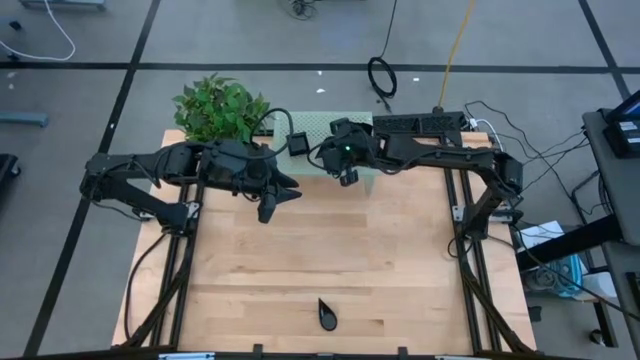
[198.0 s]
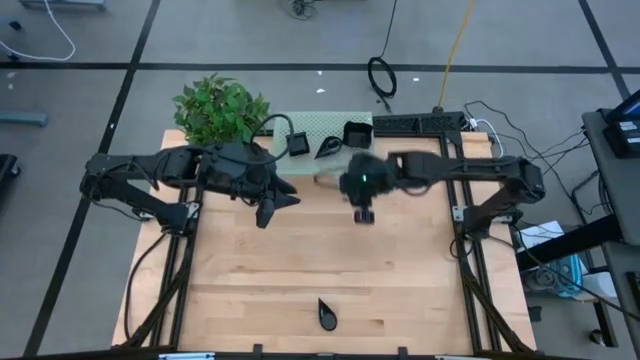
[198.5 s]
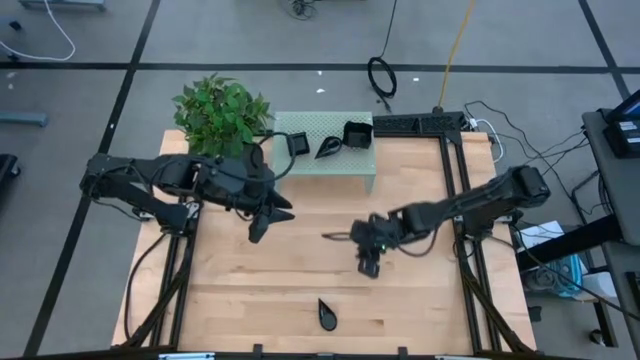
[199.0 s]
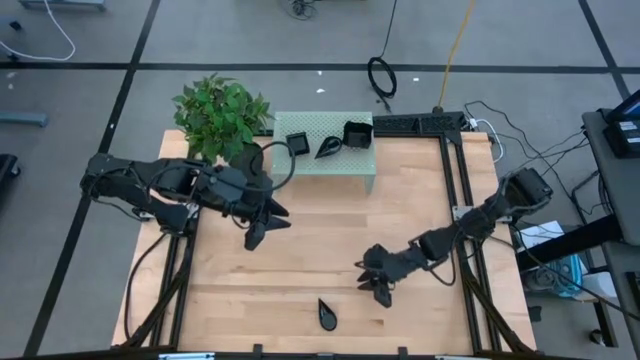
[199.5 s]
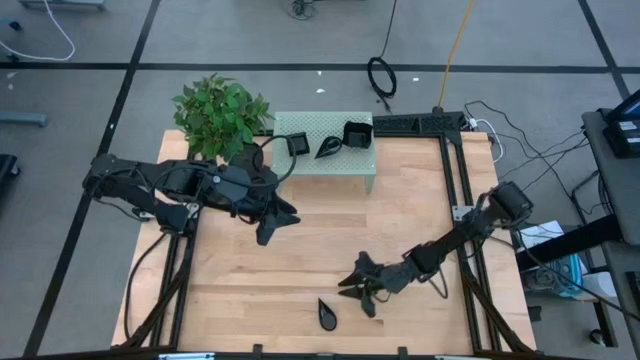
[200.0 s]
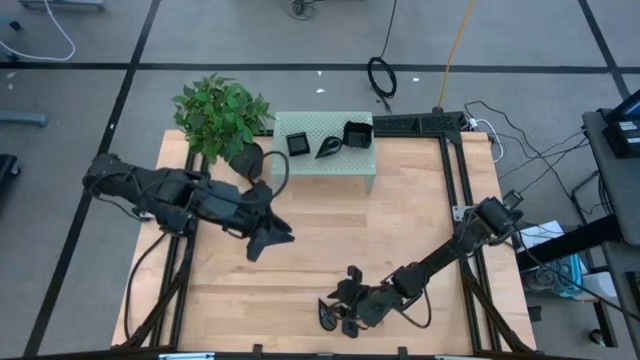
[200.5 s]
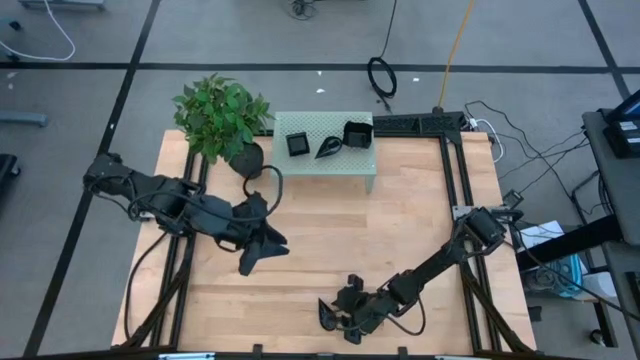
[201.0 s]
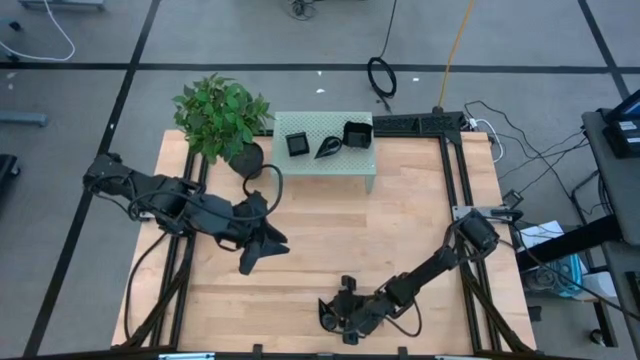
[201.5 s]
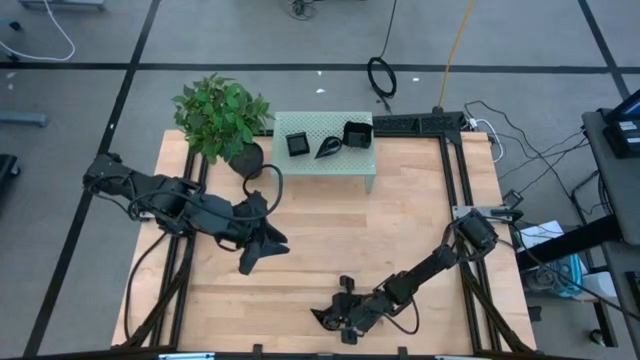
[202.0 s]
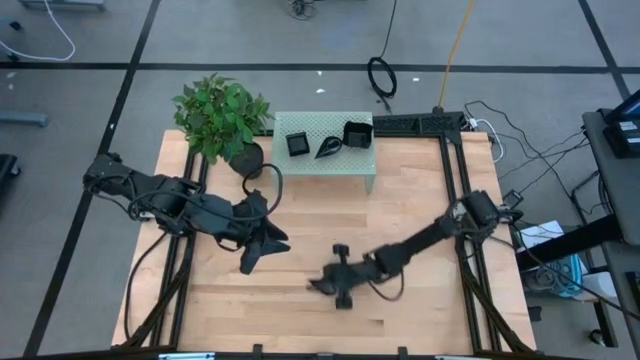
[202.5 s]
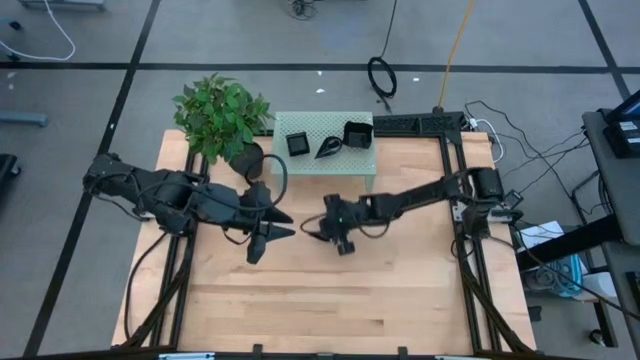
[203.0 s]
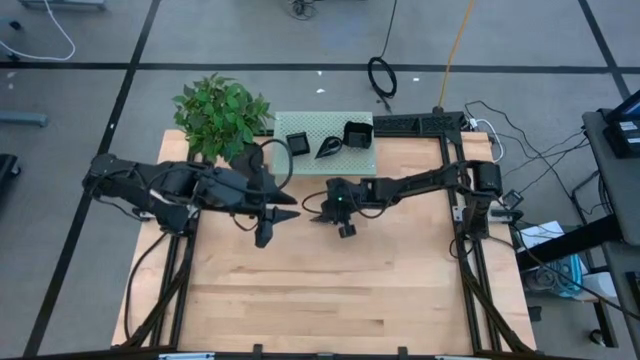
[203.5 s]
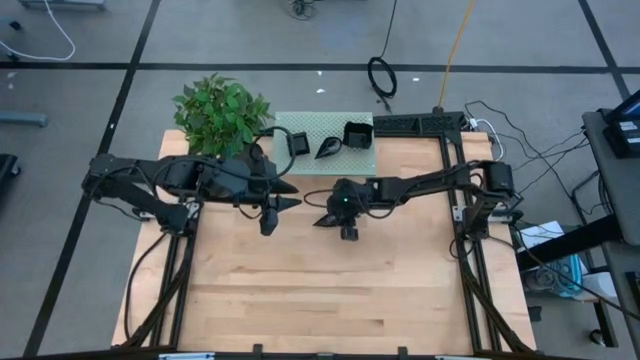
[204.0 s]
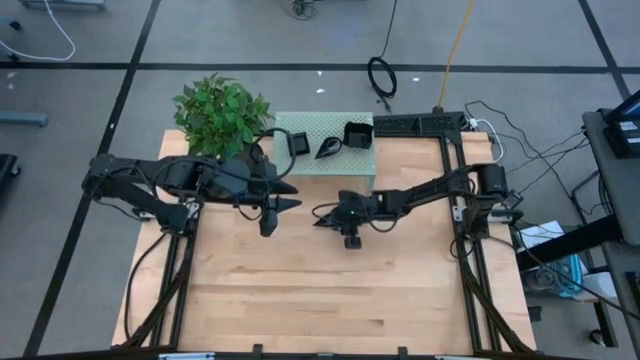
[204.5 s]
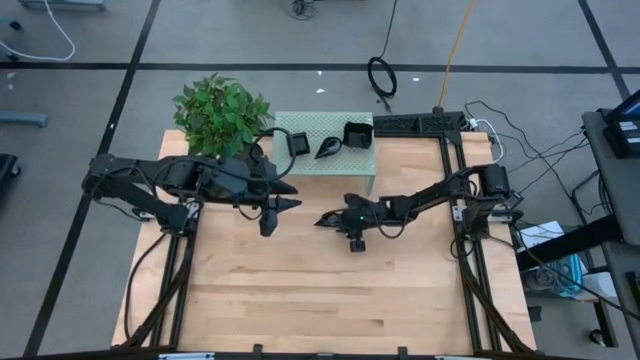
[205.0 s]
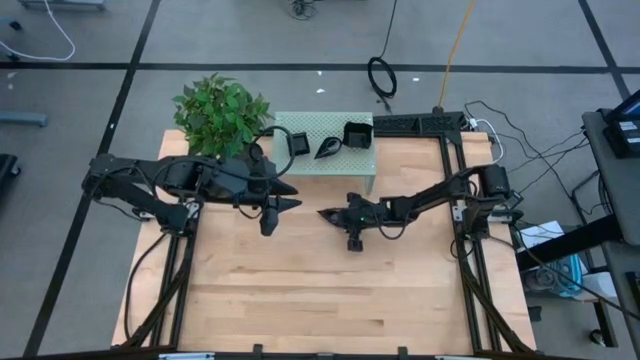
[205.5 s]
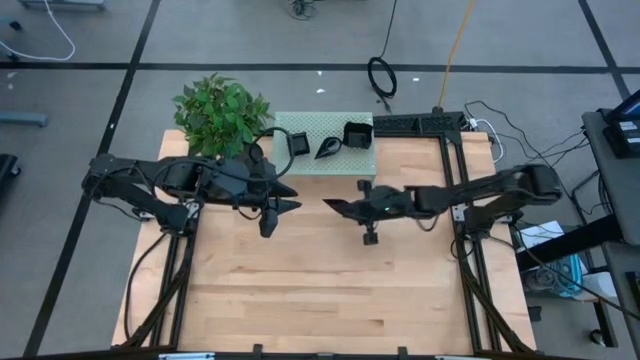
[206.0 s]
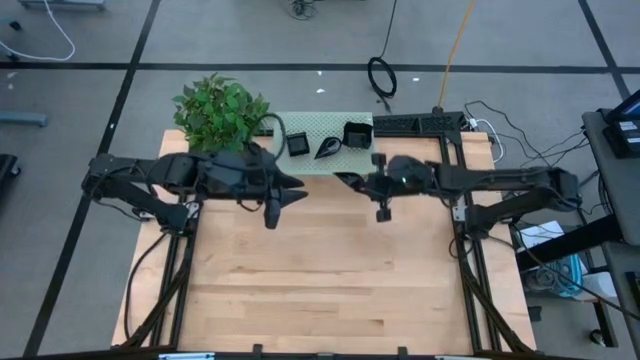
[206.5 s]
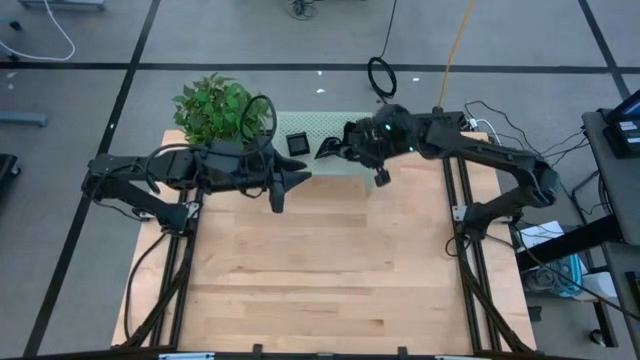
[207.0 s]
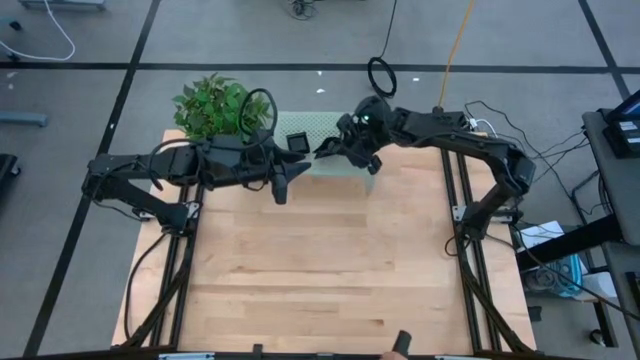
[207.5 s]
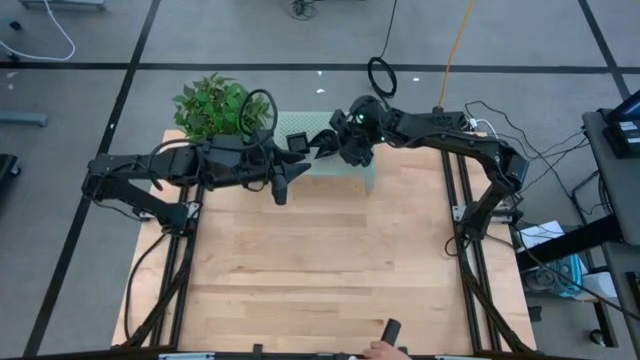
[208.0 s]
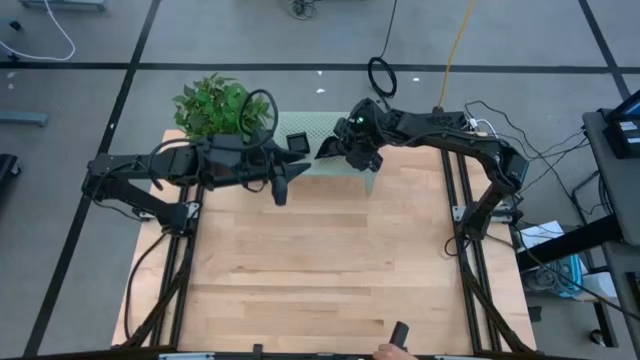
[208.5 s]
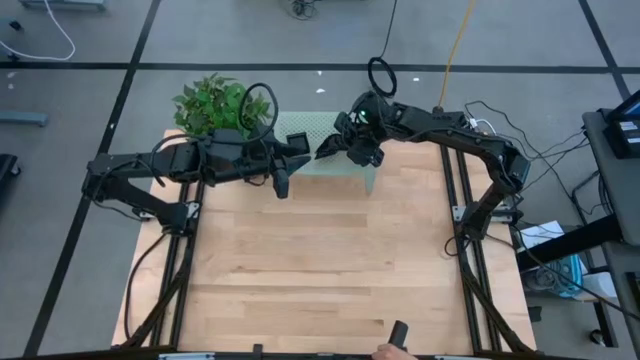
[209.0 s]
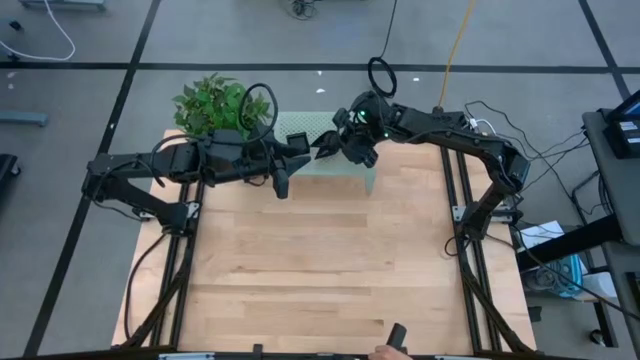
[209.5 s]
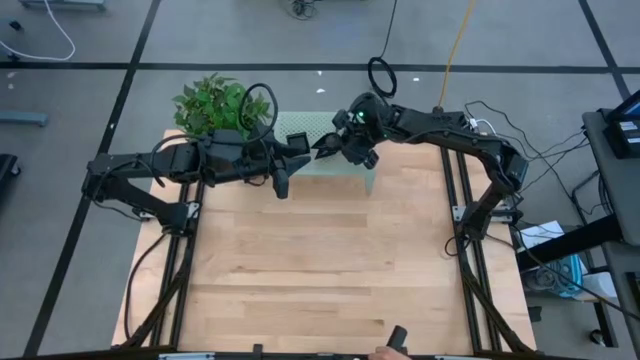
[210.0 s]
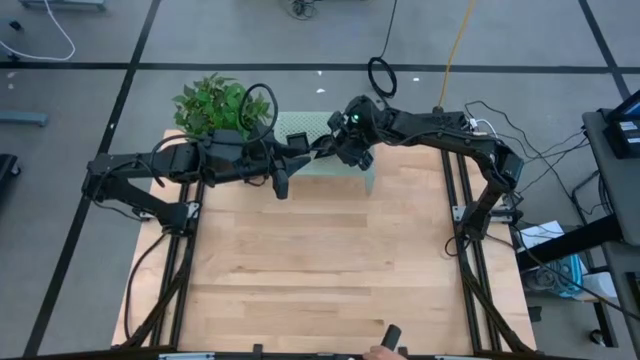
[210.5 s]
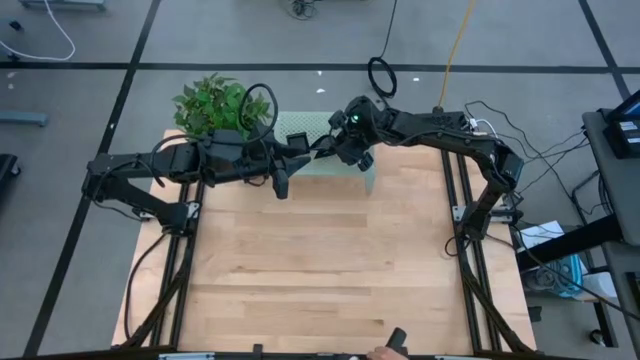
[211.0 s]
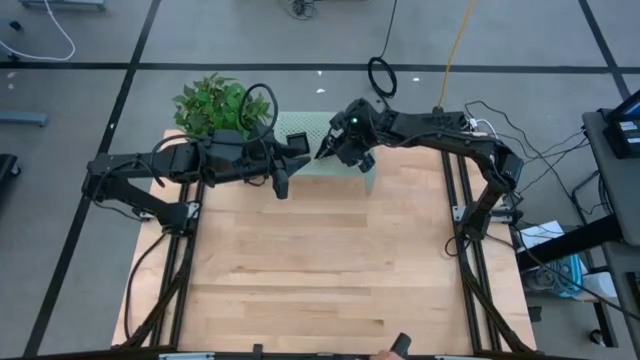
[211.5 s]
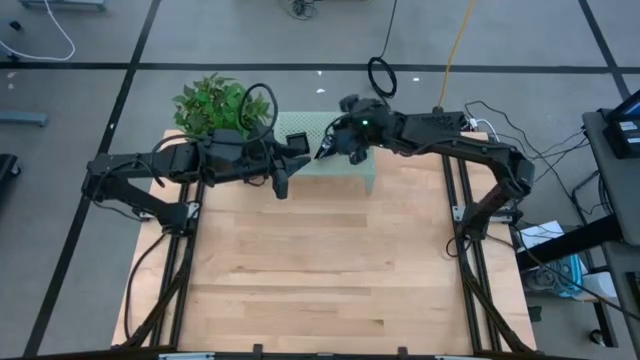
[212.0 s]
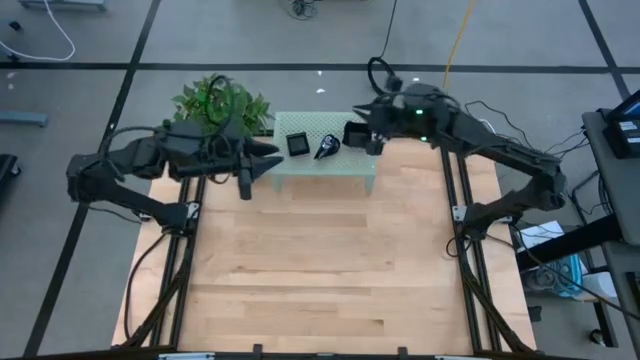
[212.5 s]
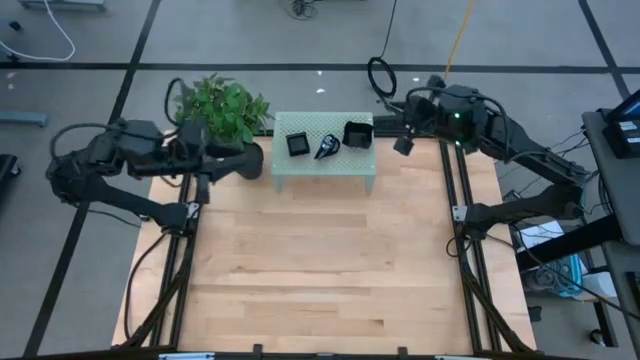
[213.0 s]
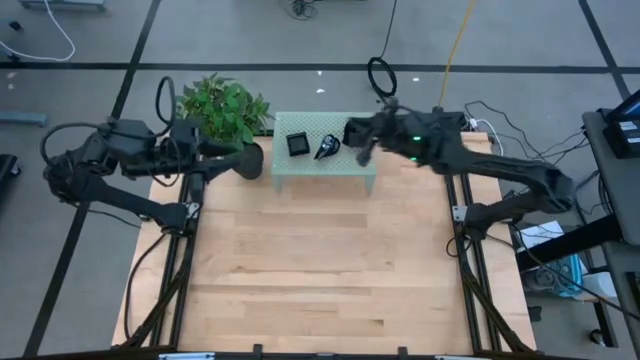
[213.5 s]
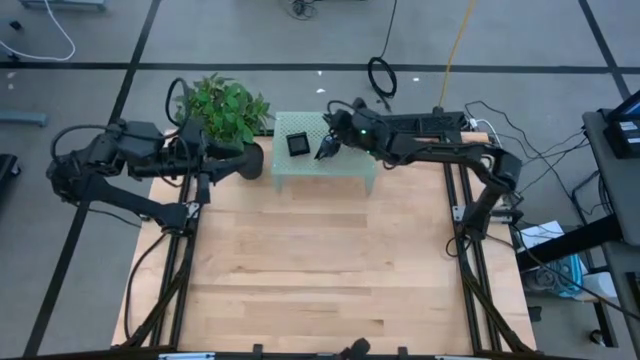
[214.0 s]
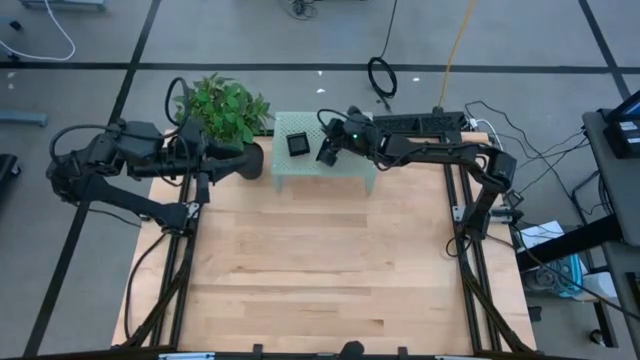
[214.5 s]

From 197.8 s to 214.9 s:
Task: Pick & Place Mini shaped plates
Stack the drop shaped plate on top of the other drop shaped plate on the shelf

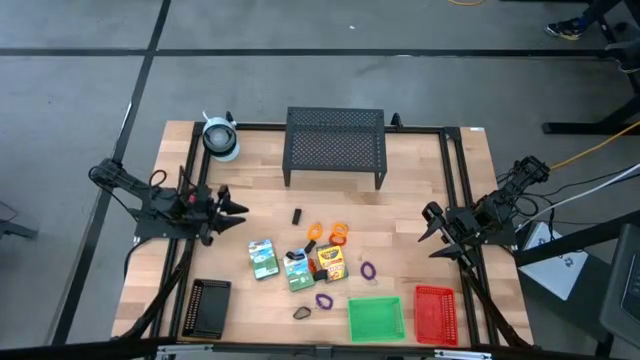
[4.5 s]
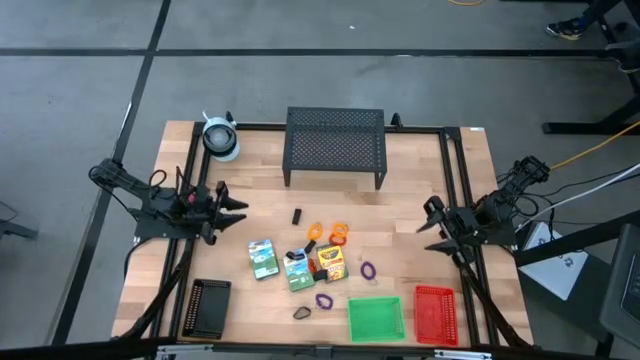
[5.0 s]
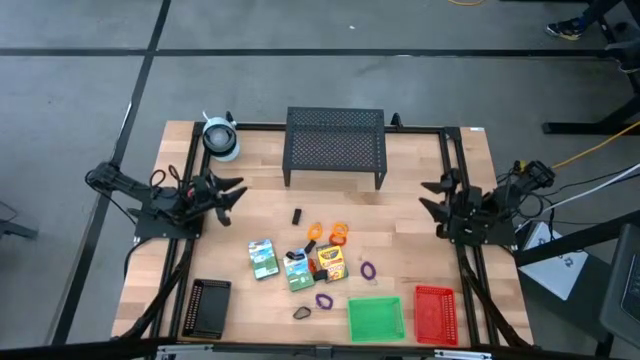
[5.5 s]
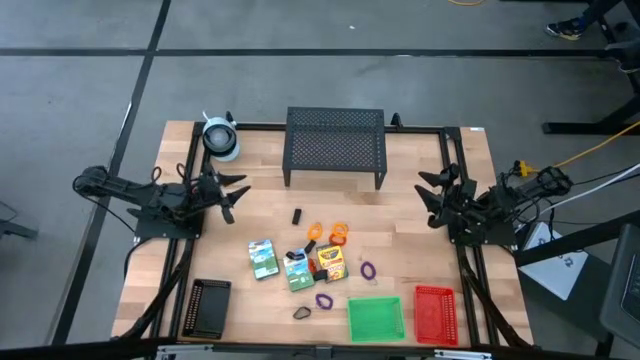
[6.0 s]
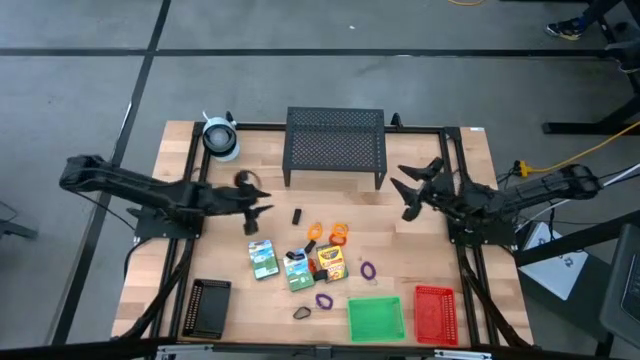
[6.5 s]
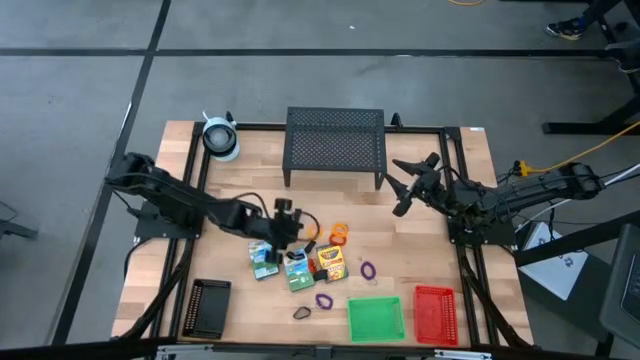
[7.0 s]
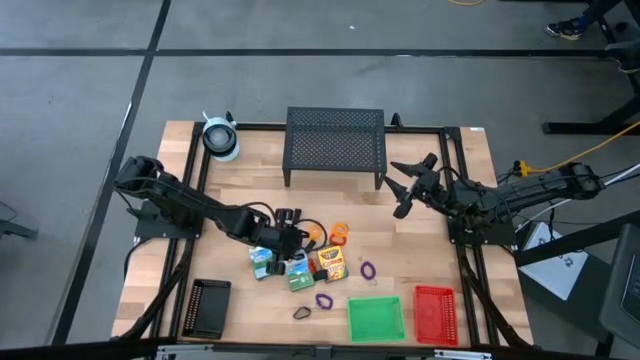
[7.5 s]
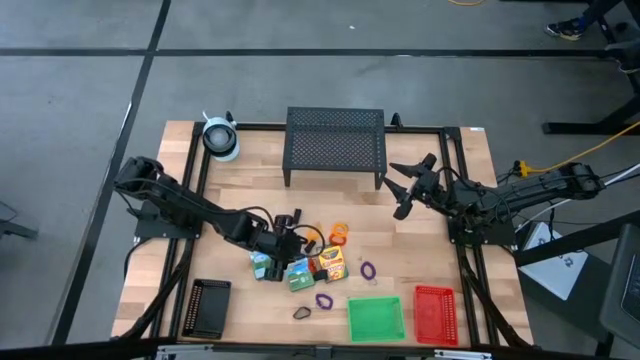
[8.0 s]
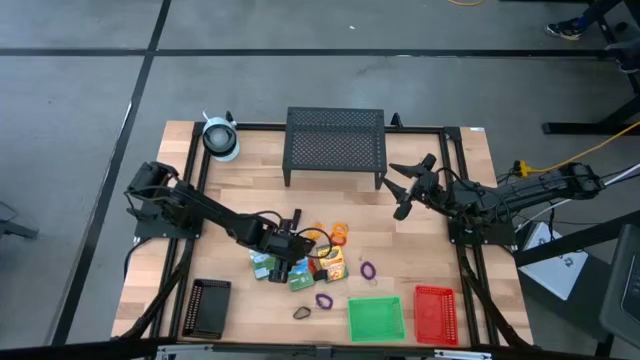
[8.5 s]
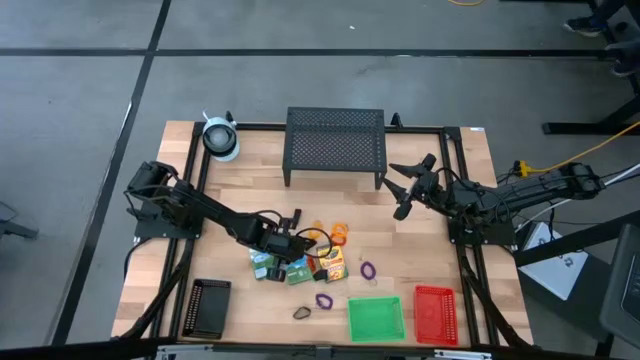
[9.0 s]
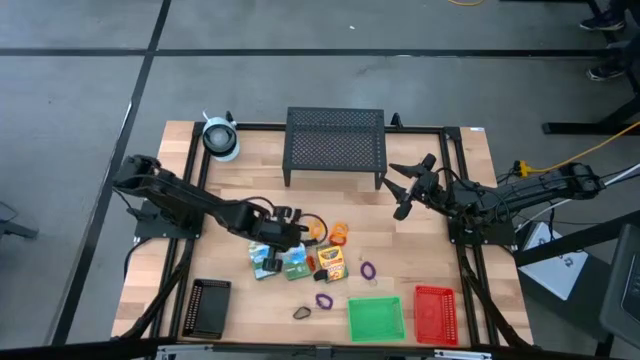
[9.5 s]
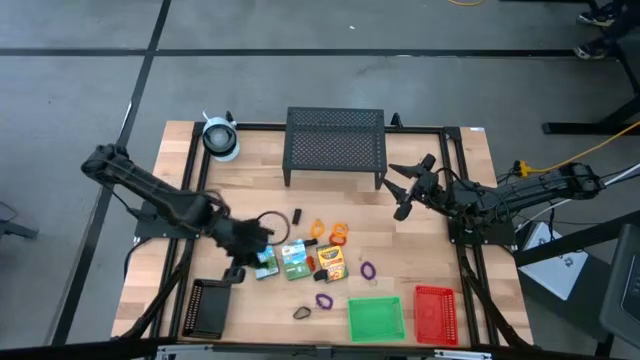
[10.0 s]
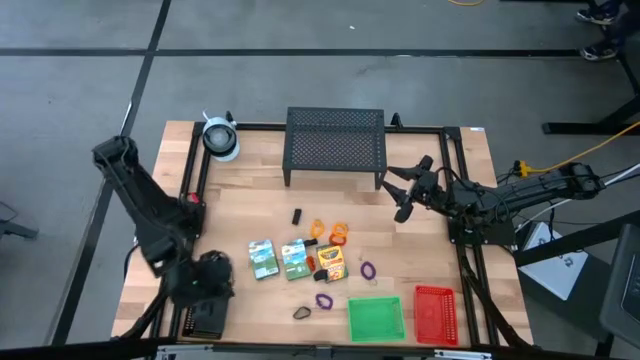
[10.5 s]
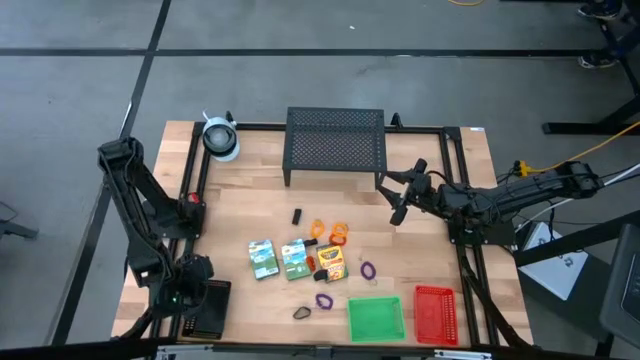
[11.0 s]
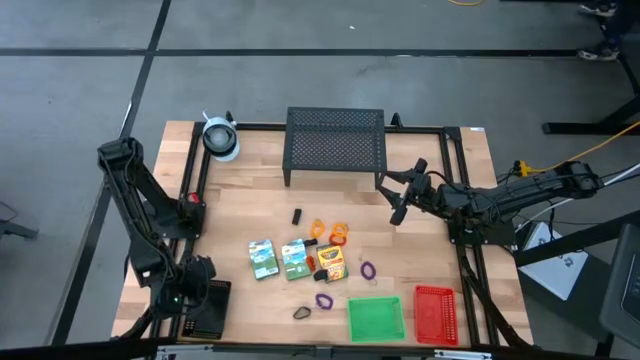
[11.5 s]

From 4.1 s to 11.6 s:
Task: Pick & Place Office Desk Supplies
Put the black rubber band into the black bin
